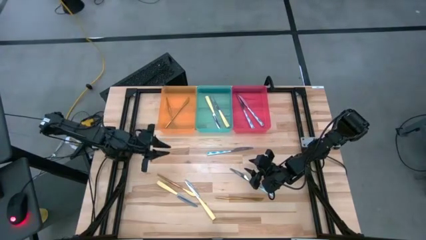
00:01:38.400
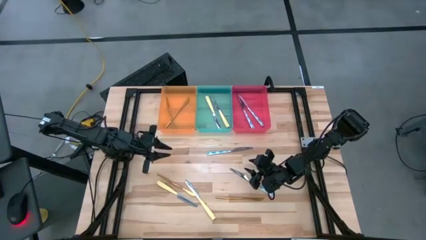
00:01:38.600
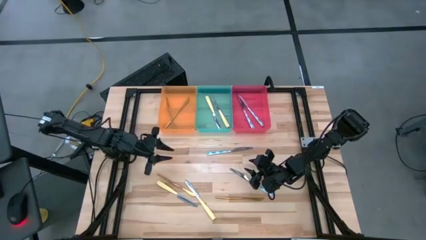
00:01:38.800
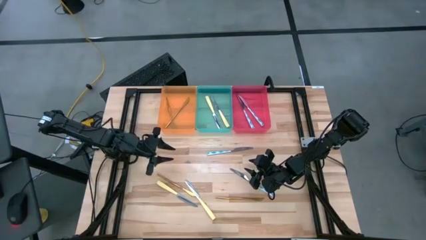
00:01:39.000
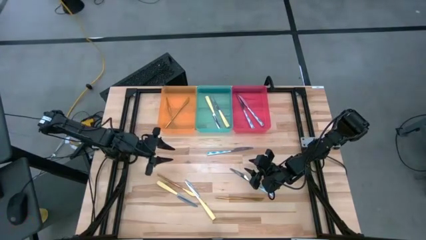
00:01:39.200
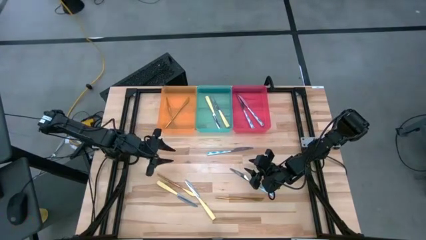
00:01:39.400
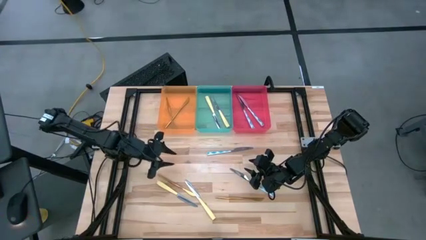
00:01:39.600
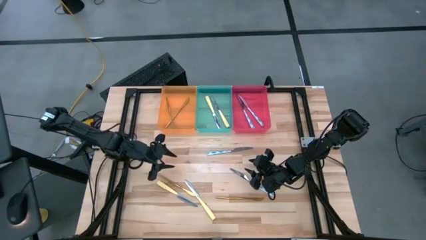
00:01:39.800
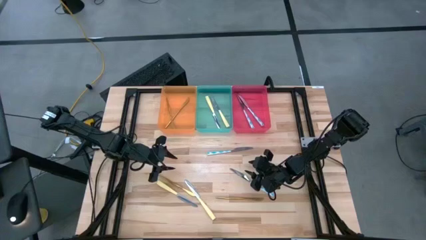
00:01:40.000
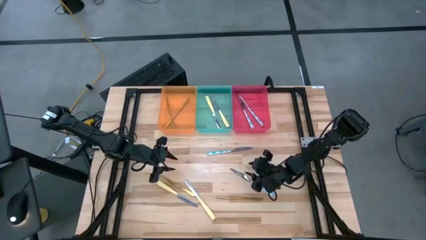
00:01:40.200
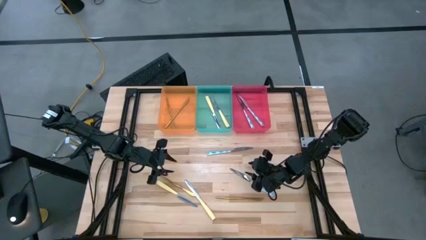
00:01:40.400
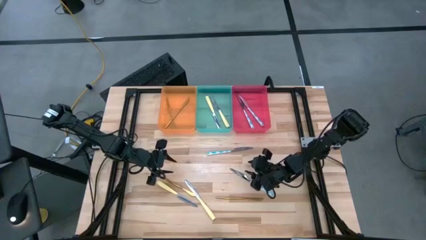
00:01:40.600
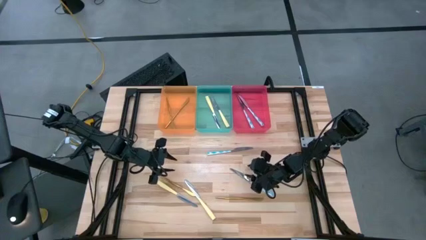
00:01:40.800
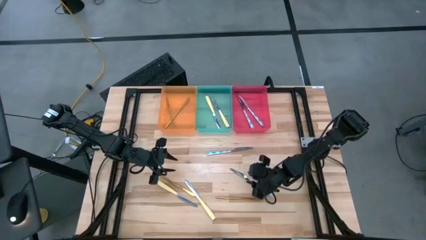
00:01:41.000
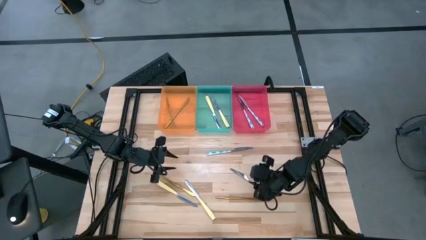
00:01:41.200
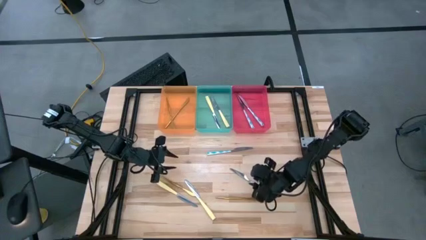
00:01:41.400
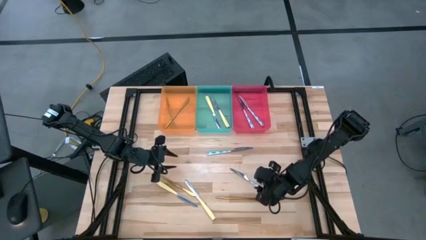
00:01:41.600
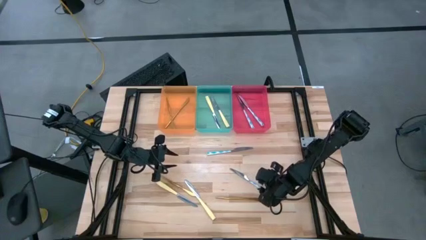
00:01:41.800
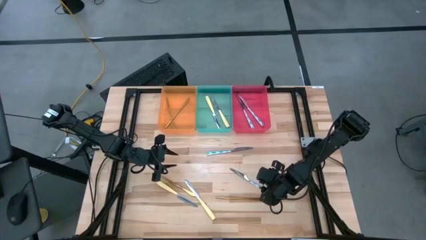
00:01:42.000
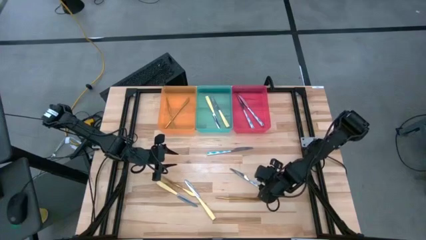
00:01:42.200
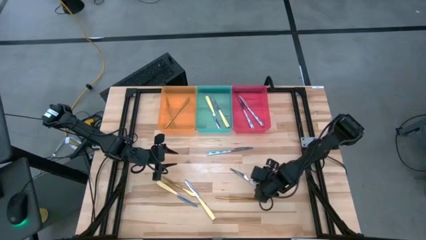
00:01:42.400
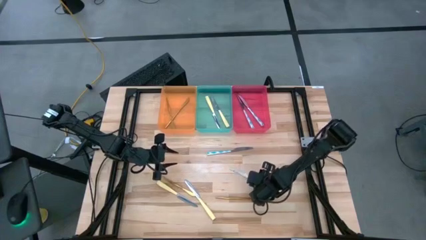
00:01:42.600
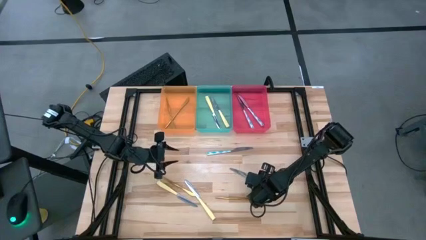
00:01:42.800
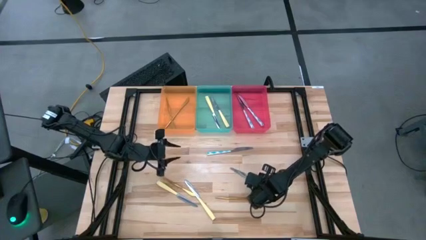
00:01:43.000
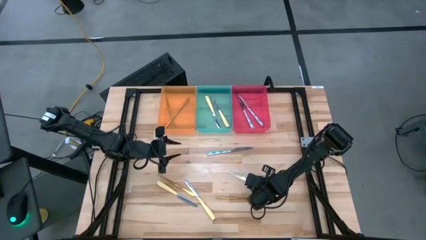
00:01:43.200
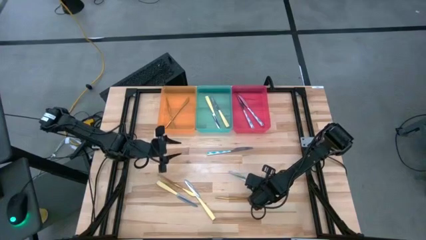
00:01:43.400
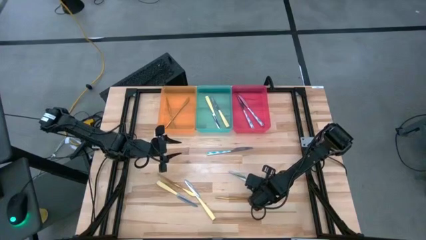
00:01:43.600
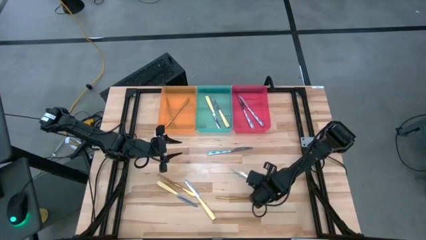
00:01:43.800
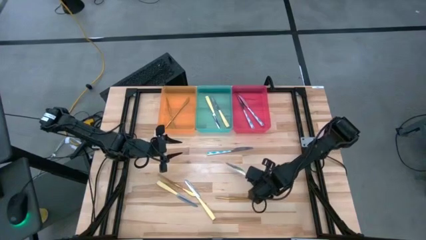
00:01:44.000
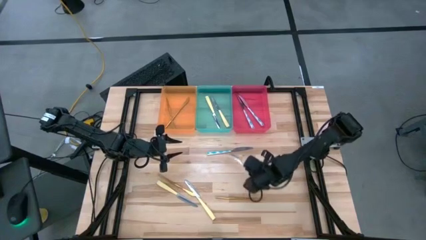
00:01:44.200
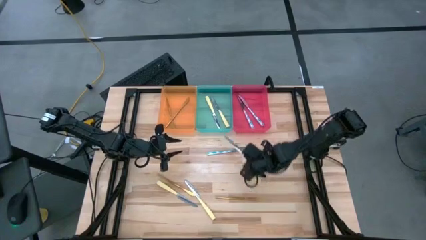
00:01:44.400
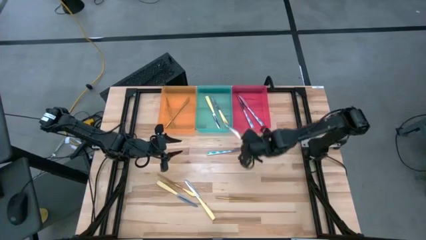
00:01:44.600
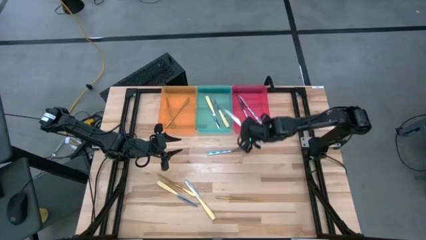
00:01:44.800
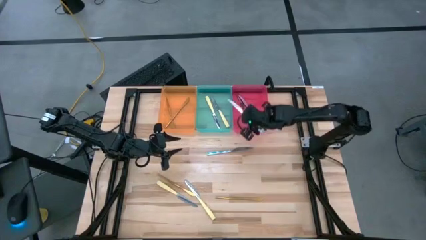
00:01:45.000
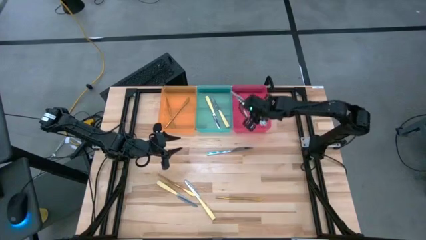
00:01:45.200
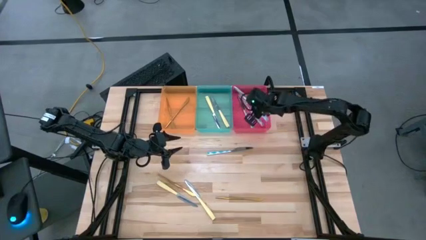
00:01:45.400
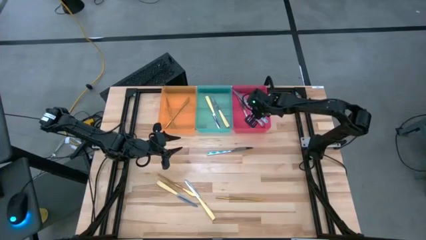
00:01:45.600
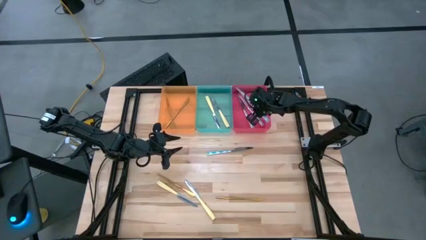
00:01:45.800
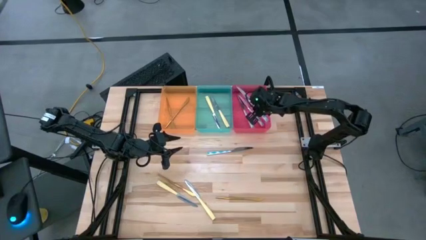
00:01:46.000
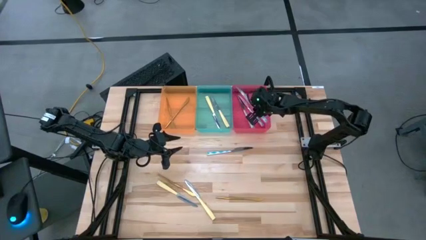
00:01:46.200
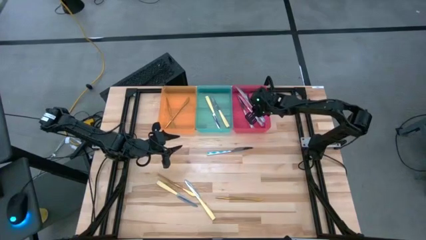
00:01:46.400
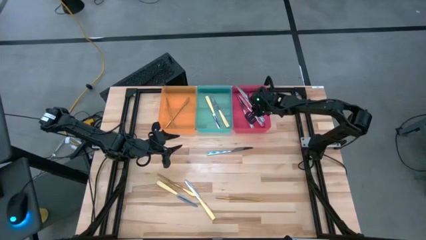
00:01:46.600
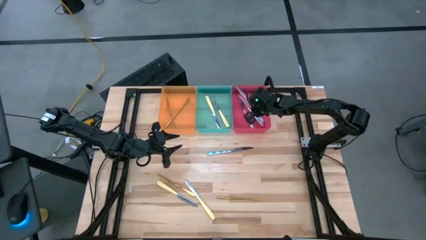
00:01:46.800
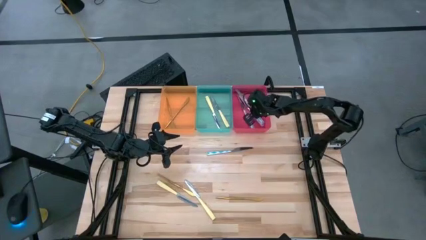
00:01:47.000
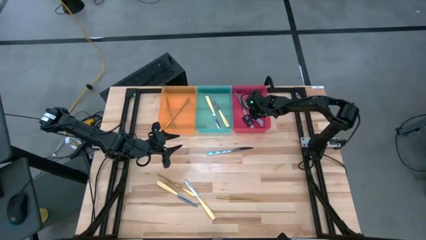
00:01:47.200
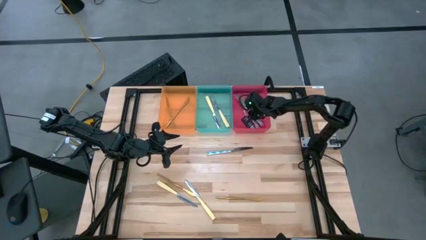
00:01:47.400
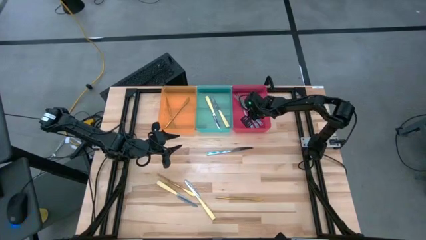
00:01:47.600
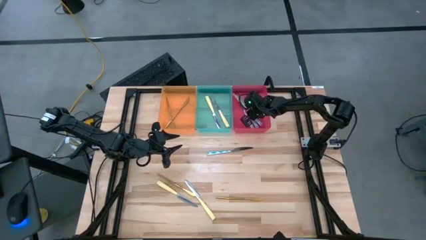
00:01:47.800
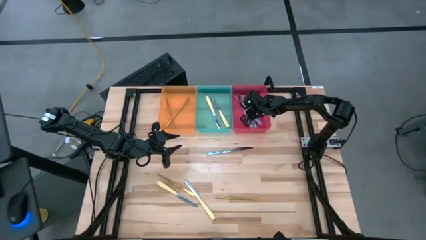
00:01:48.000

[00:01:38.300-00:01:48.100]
Task: Sort silverware by color (type)
Put the blue patterned table knife into the red bin

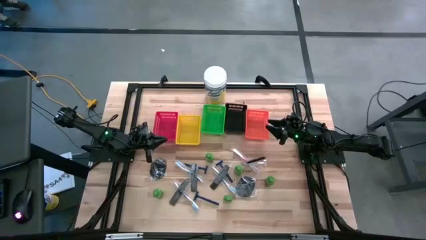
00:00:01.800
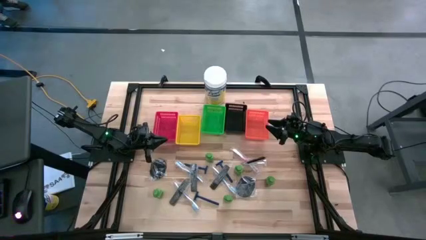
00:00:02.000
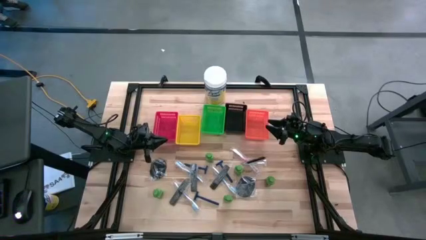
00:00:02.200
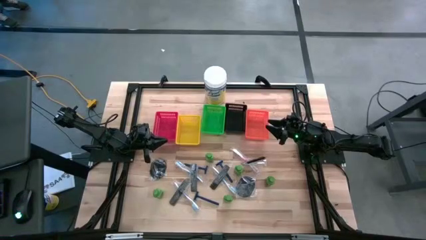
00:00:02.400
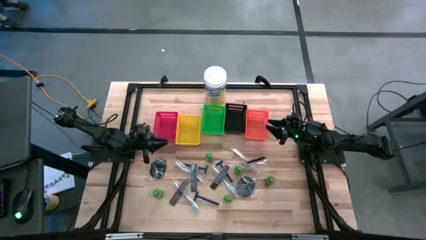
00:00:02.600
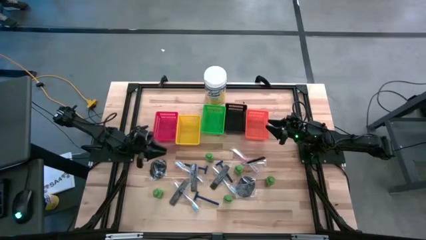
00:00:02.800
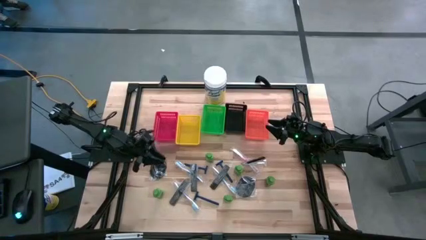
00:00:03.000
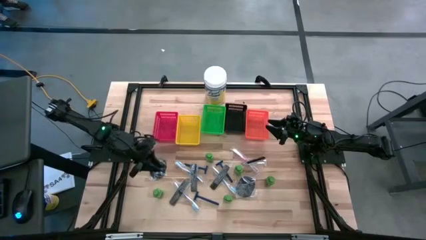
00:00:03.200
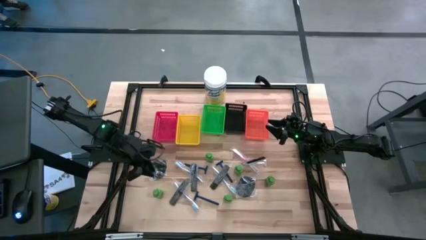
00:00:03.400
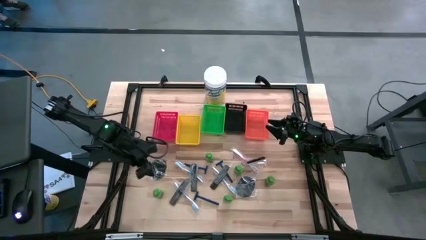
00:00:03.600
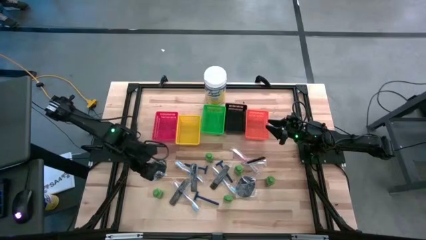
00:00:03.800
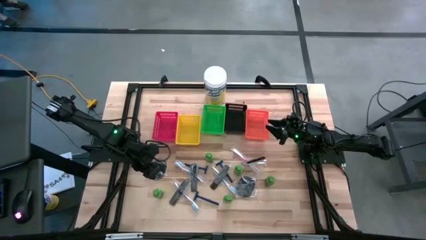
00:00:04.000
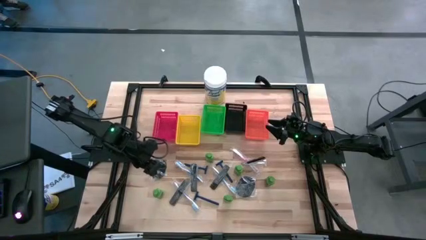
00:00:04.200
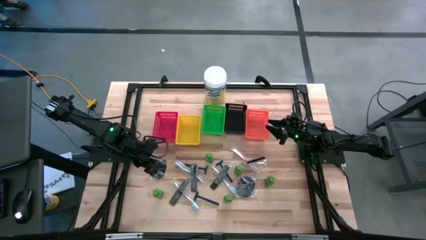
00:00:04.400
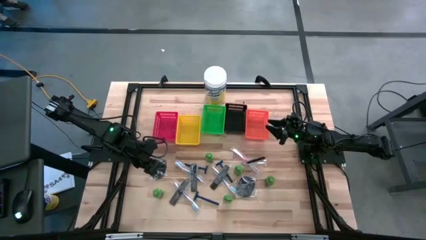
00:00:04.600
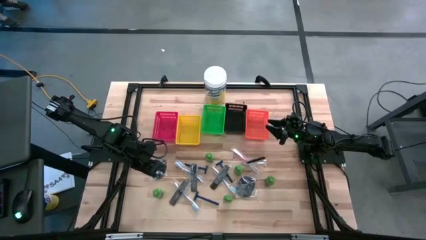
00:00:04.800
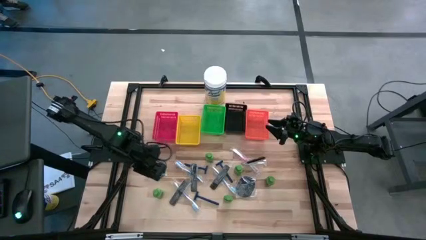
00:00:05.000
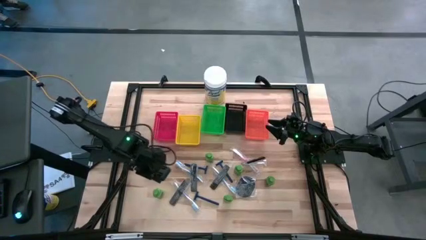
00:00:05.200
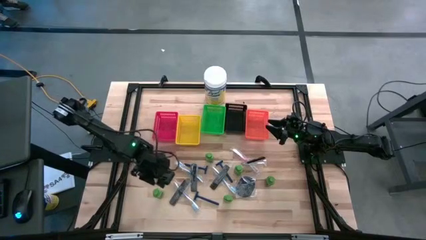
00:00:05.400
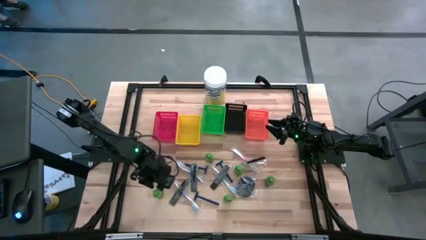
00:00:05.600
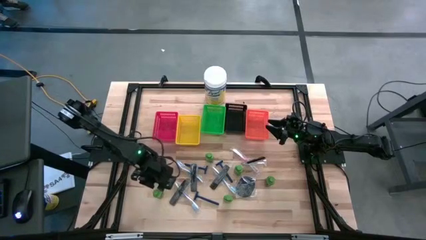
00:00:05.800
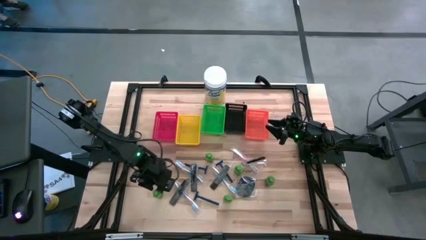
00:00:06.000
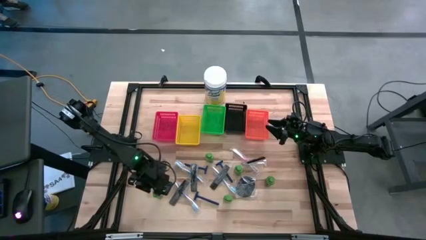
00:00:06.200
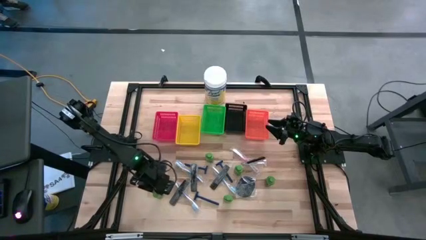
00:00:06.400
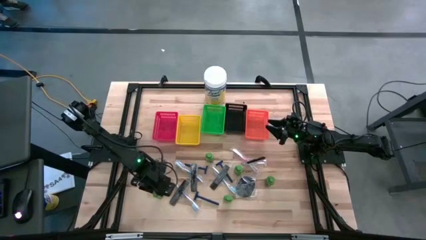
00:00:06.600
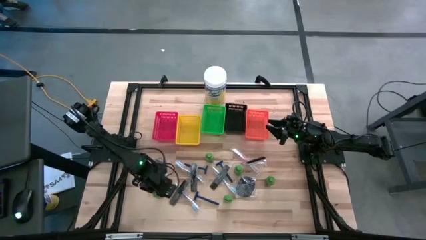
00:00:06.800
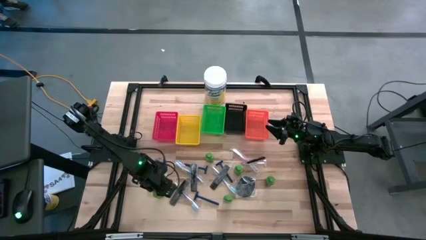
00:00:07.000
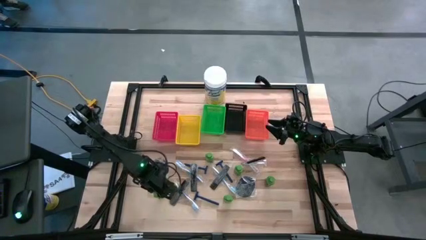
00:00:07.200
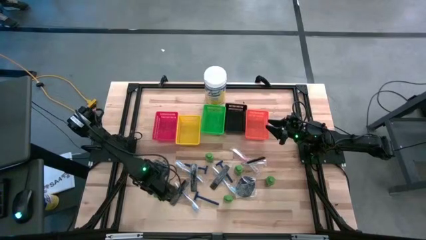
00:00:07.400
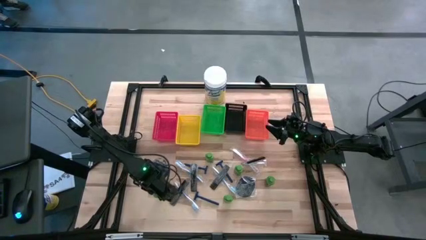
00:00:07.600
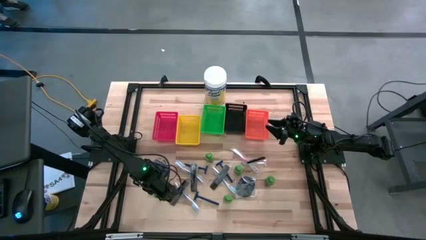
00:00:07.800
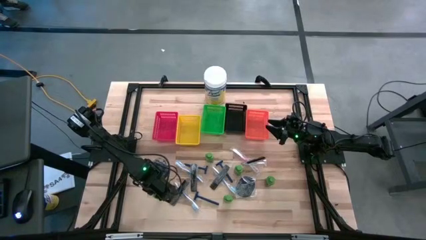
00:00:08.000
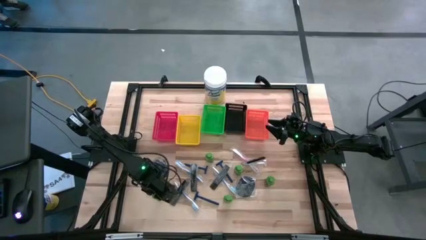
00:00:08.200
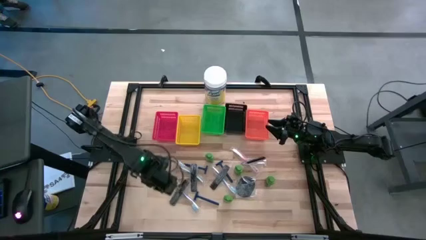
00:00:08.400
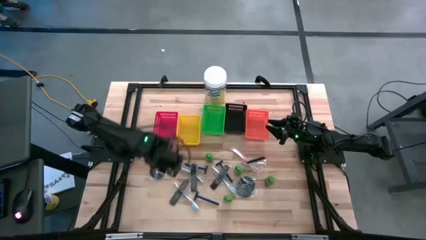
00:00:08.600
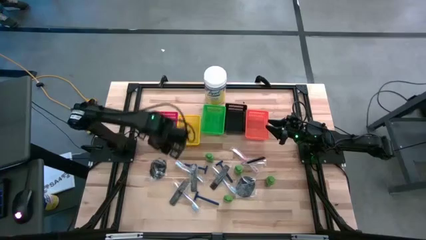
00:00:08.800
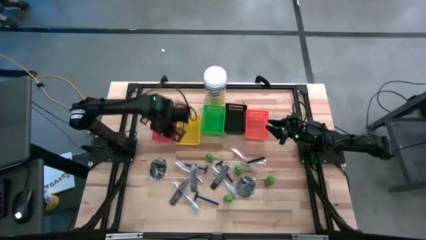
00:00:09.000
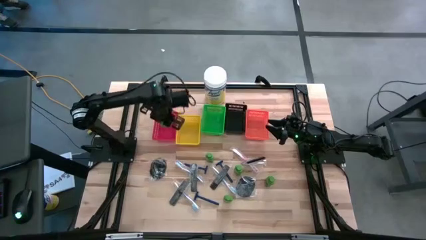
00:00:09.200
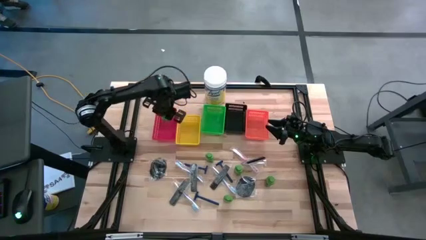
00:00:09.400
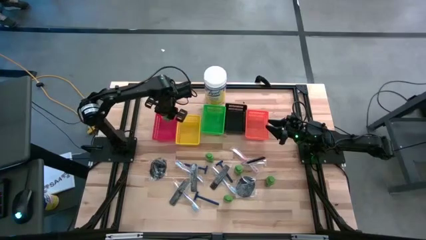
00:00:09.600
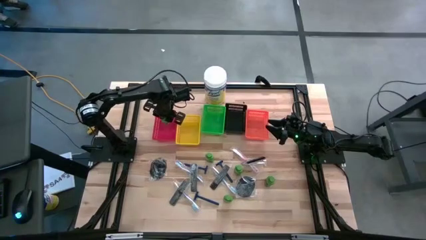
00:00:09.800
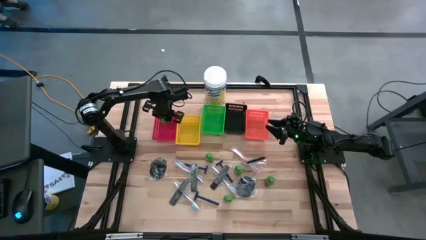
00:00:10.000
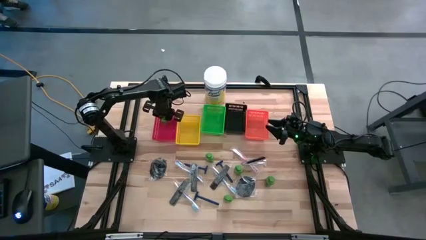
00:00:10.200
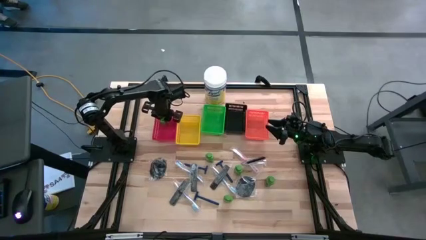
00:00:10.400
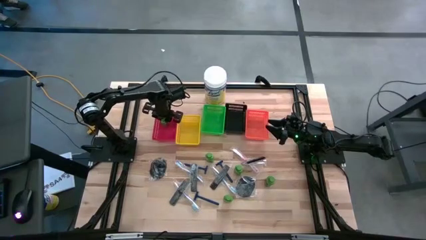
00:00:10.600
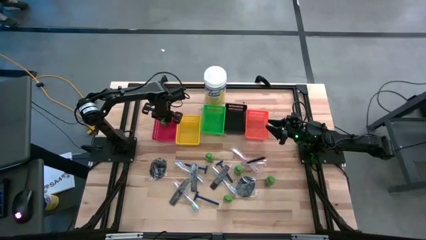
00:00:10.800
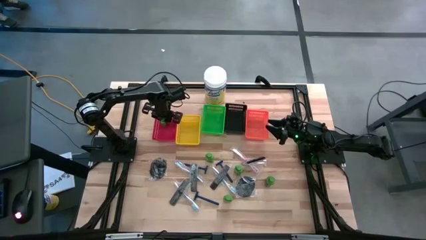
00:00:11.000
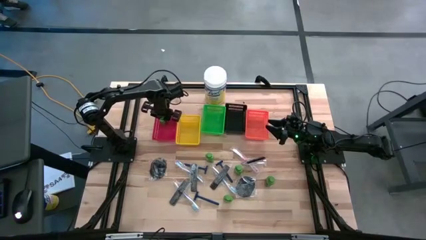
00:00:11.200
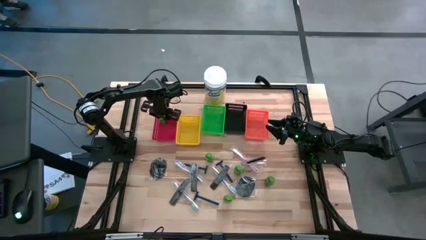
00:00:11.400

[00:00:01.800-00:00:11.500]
Task: Pick & Place Travel size toiletries
Put the green shampoo bottle into the red bin
